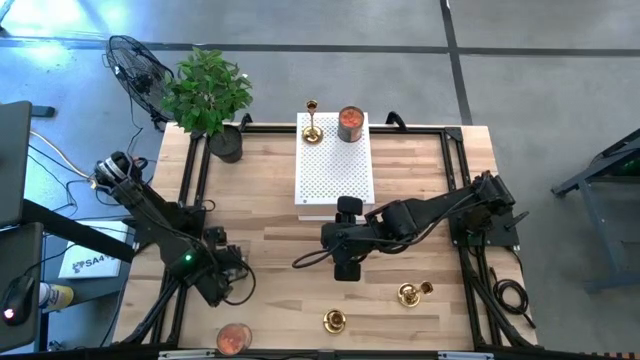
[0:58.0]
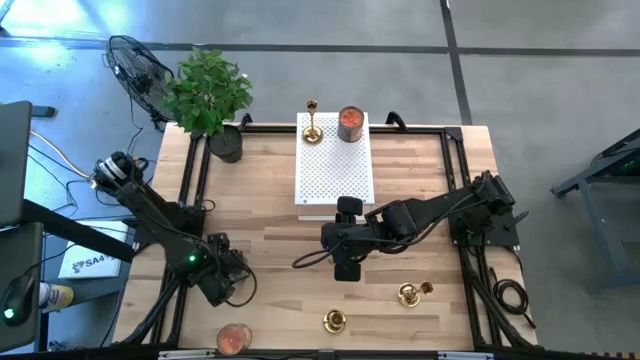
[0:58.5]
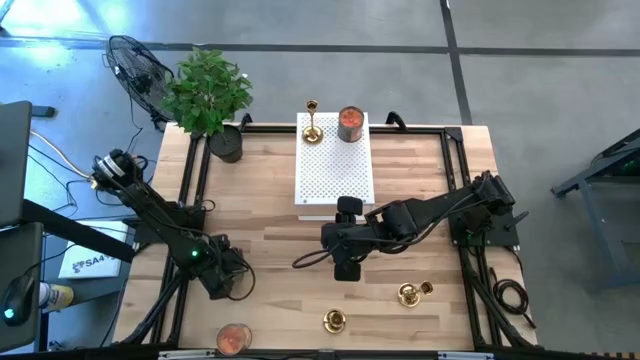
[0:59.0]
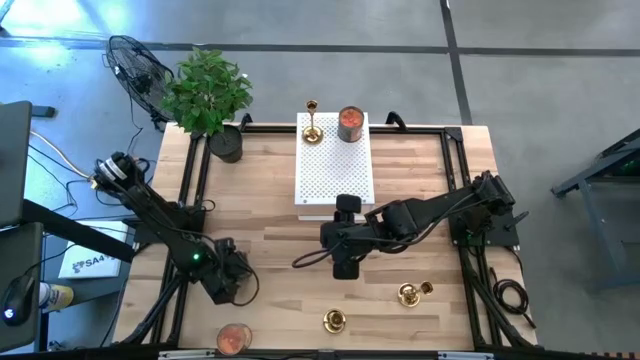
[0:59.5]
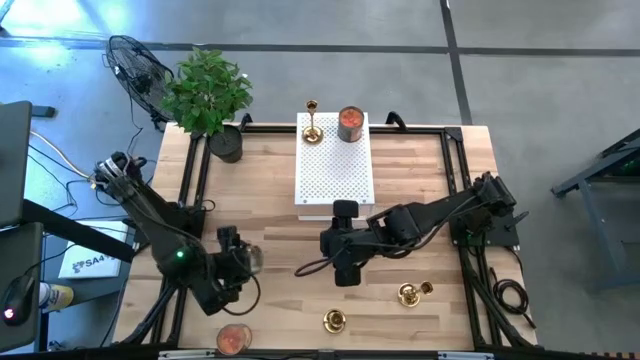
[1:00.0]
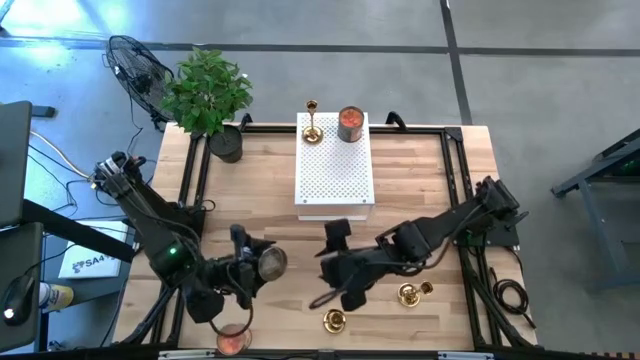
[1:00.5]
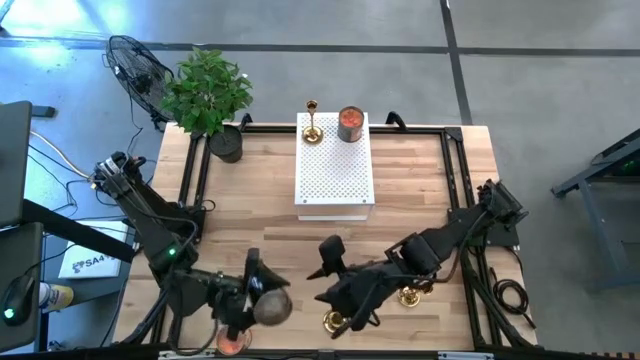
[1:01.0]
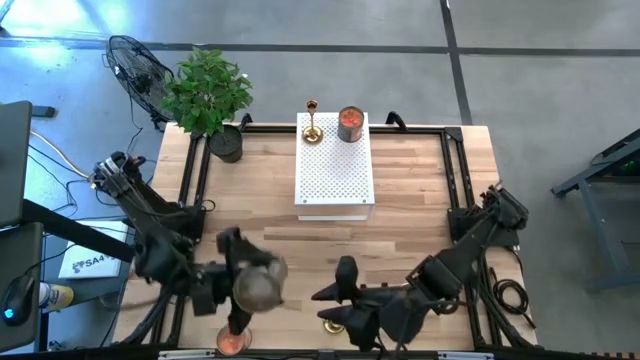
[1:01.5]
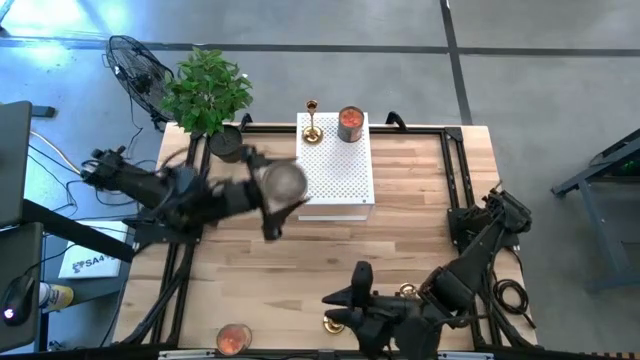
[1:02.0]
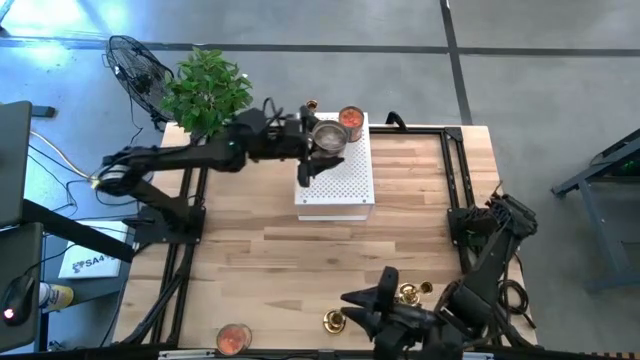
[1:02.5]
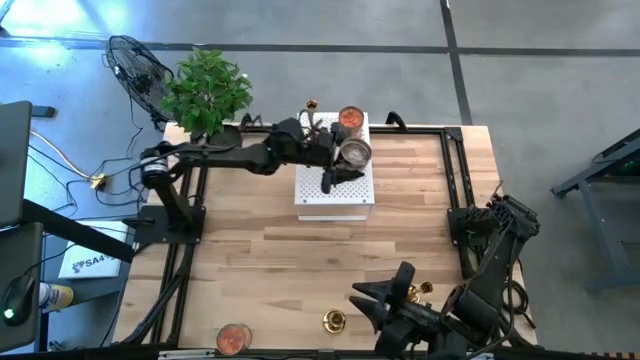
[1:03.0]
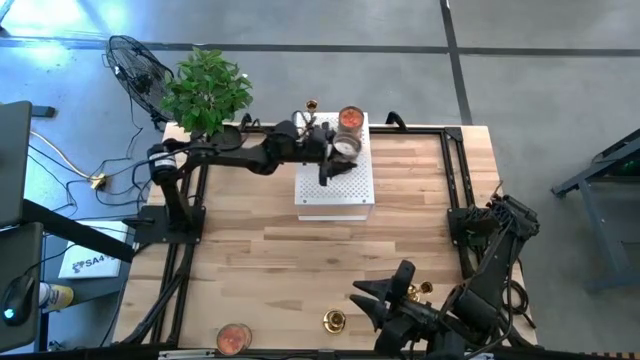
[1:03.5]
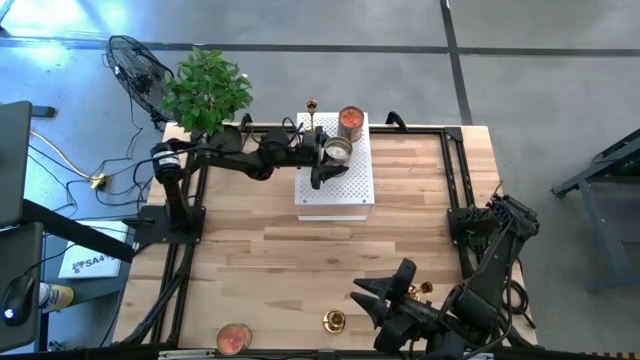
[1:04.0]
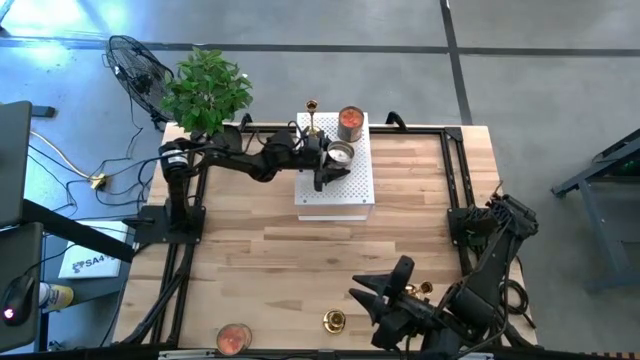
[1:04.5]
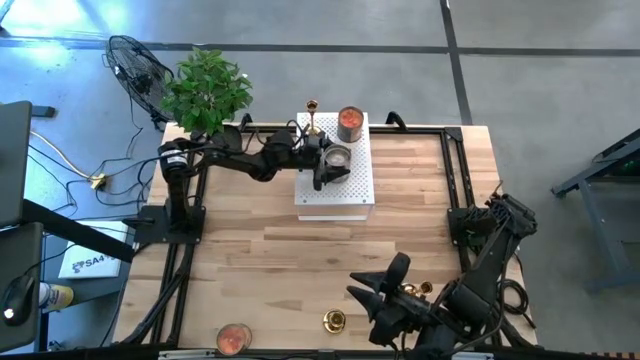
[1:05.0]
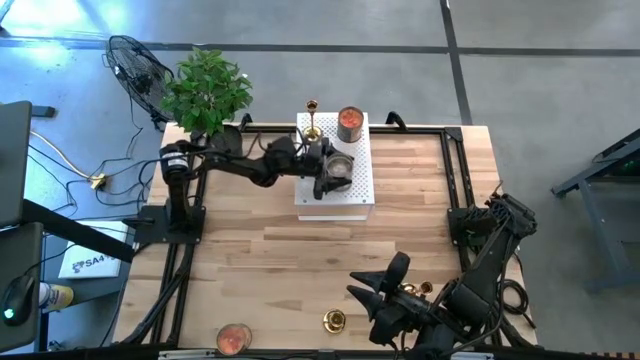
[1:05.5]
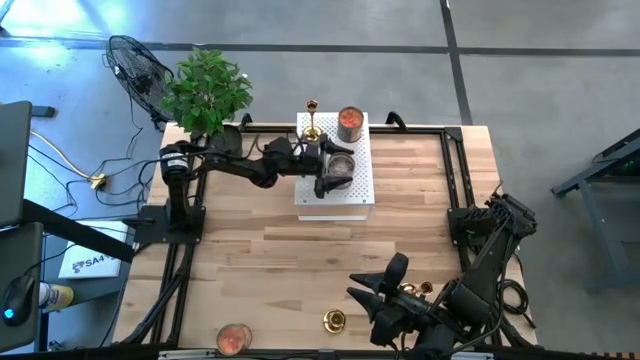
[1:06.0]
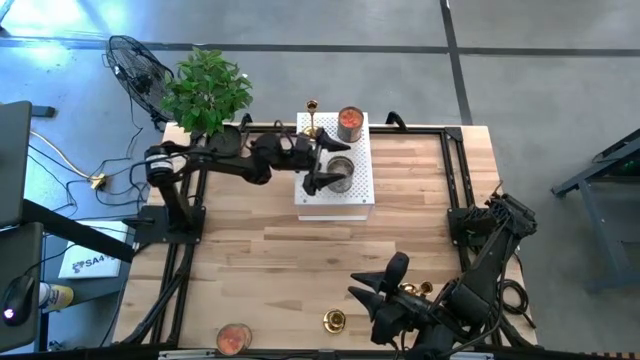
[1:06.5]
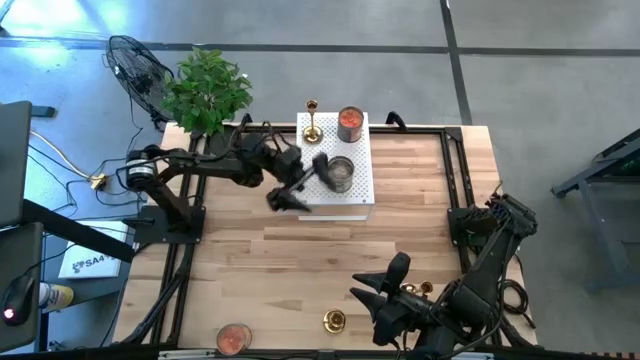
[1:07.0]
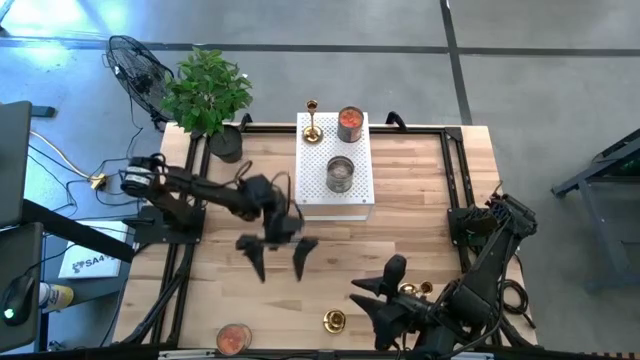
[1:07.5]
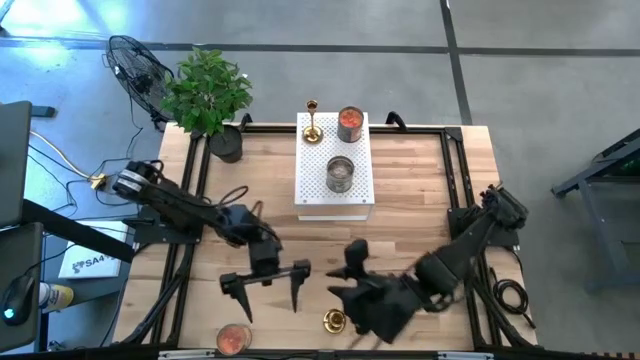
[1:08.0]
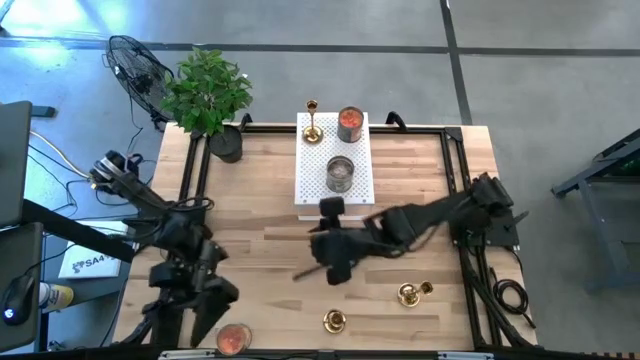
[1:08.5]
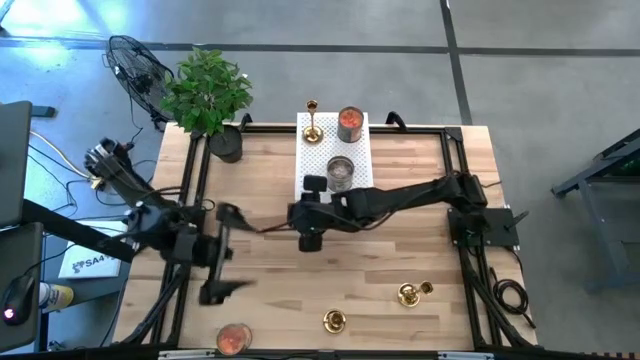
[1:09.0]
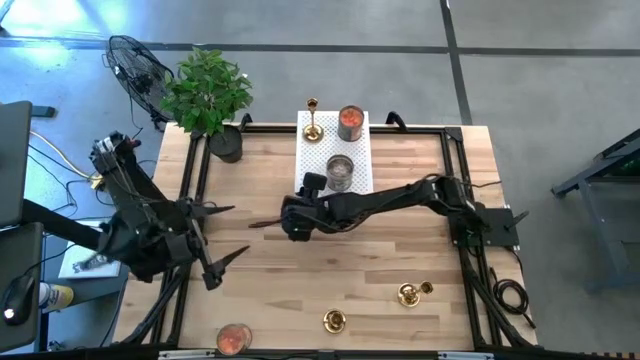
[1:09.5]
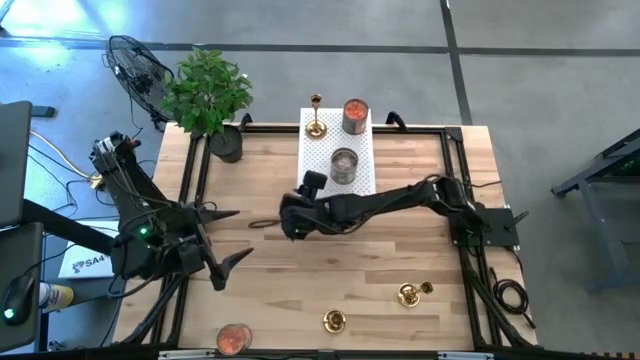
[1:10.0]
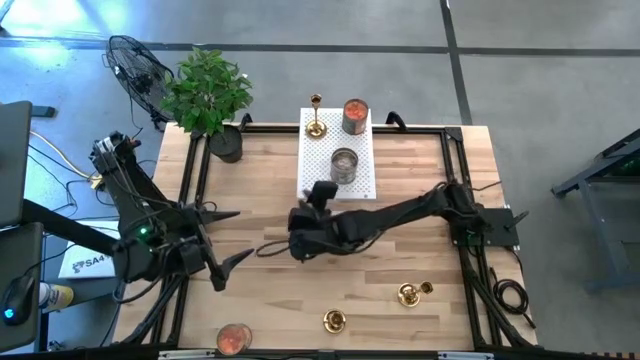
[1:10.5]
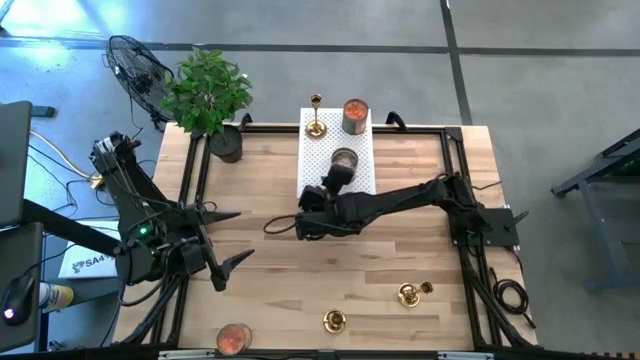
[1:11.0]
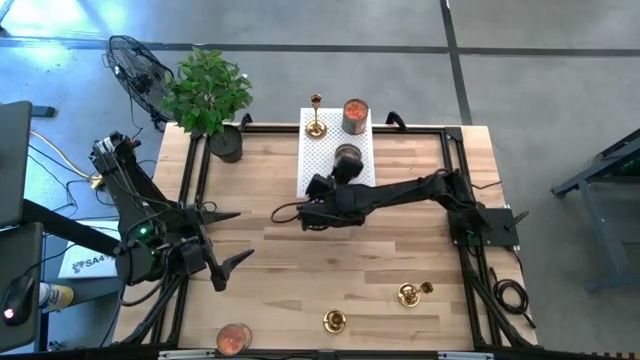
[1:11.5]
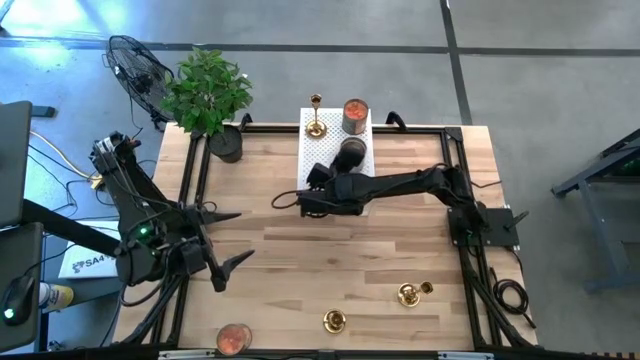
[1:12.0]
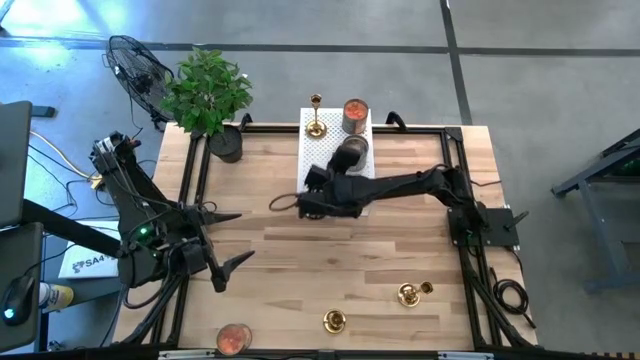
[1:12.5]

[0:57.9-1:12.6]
Task: Pick & Place candle stick holders
Put the brown scented candle on the shelf

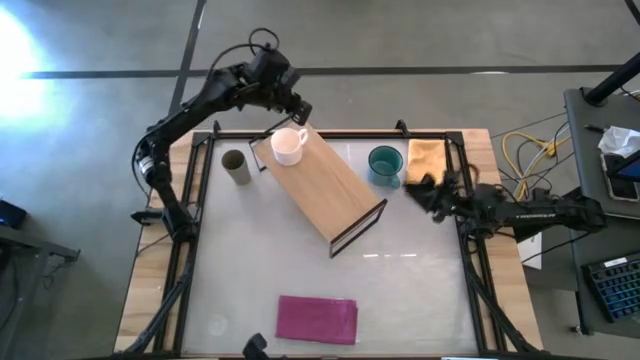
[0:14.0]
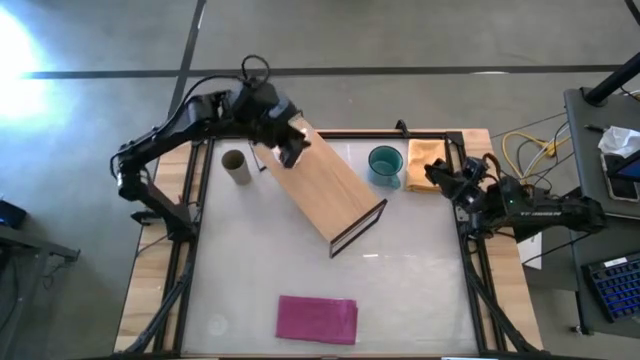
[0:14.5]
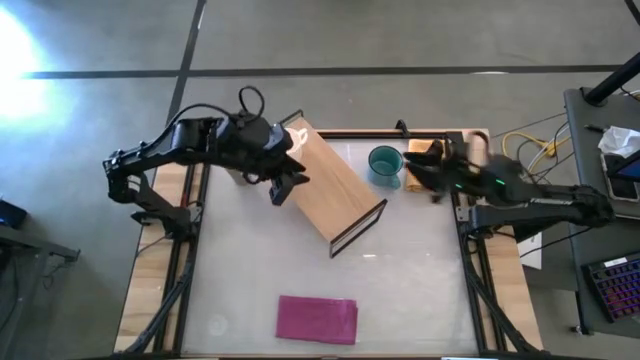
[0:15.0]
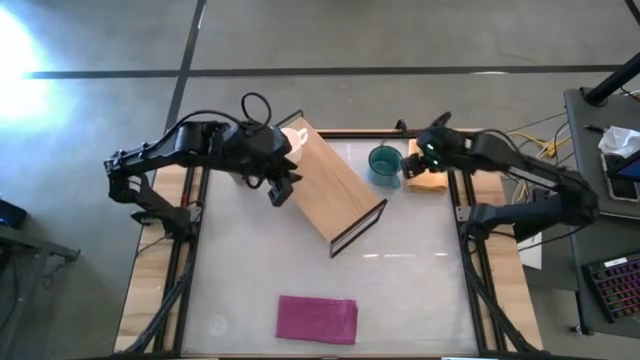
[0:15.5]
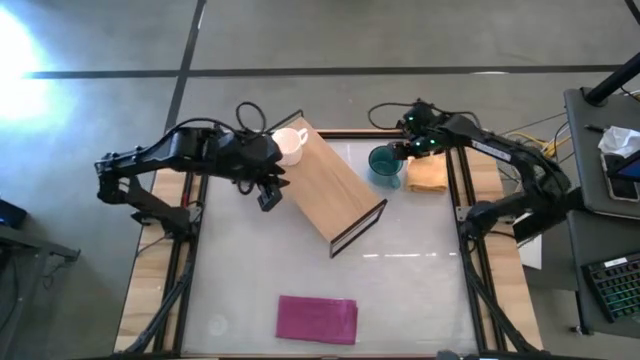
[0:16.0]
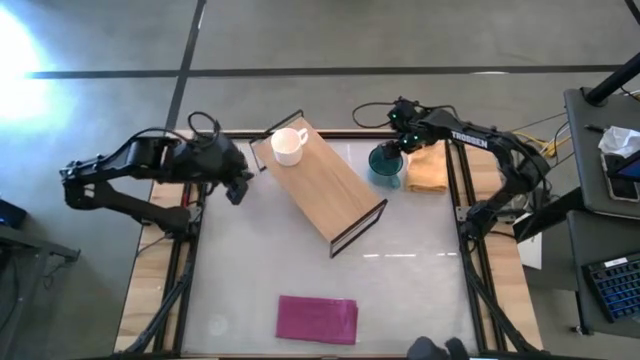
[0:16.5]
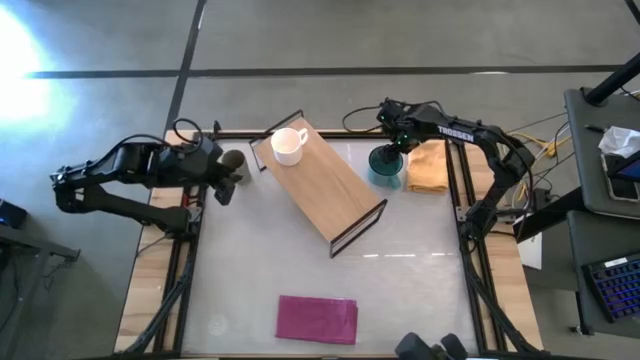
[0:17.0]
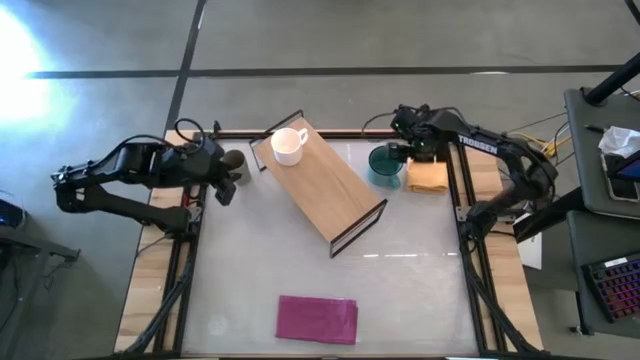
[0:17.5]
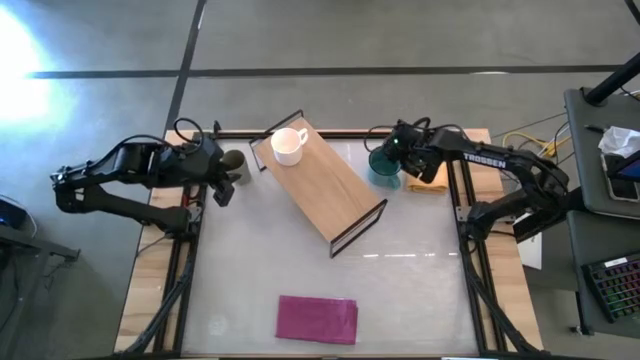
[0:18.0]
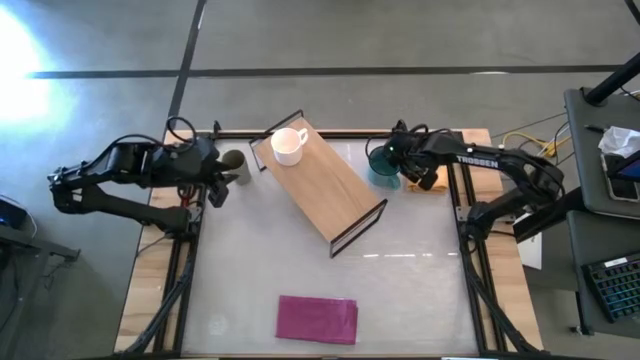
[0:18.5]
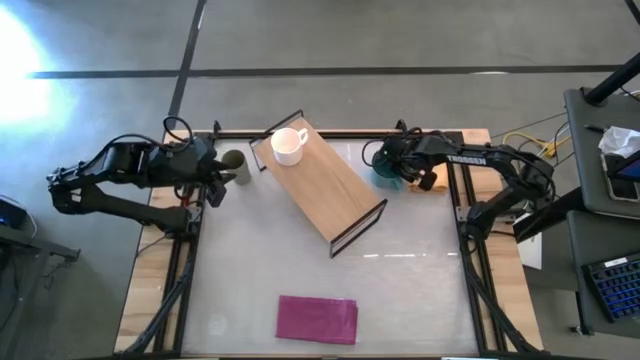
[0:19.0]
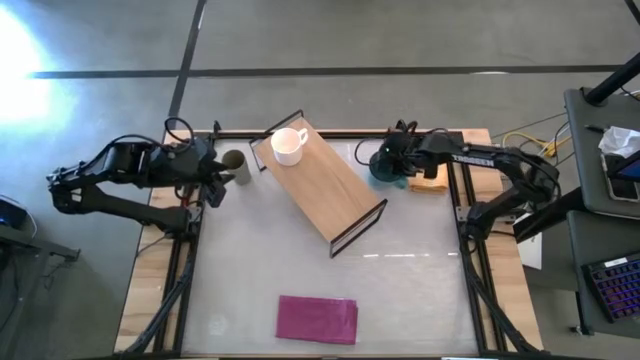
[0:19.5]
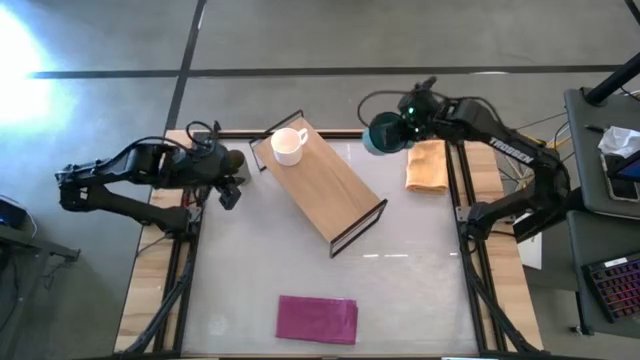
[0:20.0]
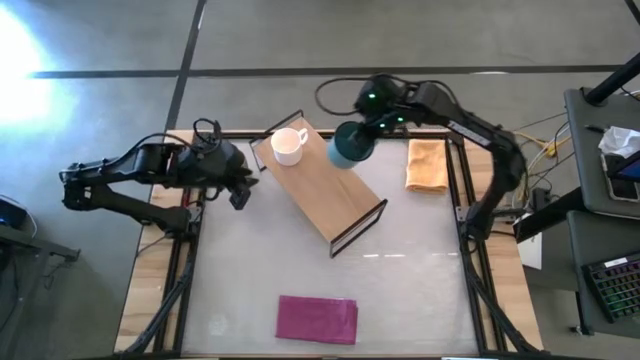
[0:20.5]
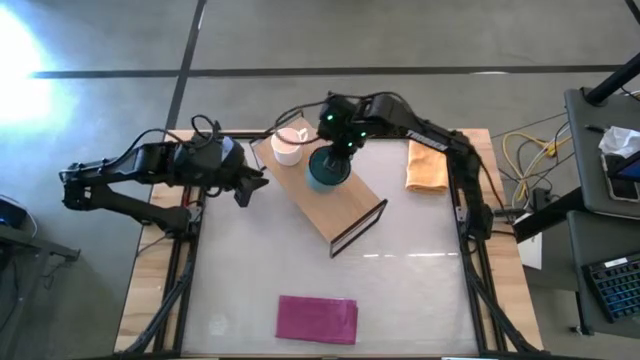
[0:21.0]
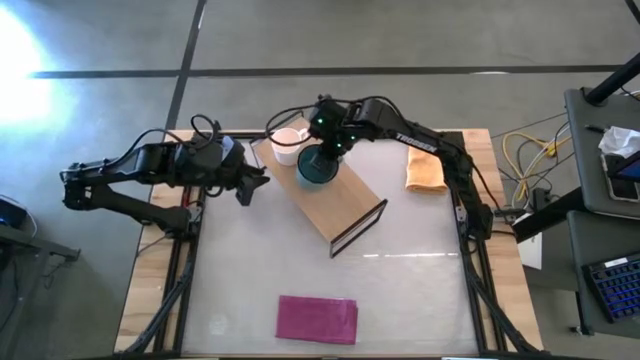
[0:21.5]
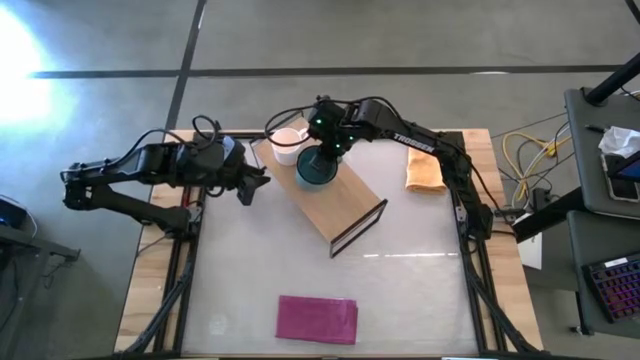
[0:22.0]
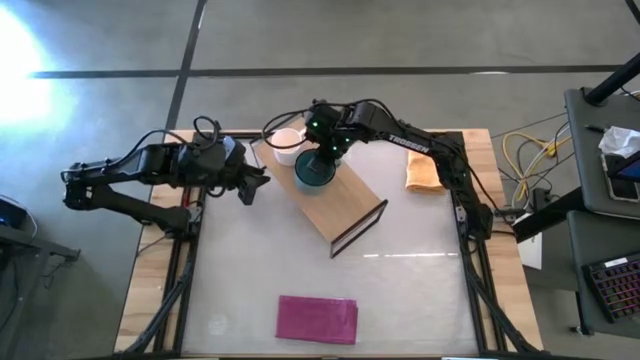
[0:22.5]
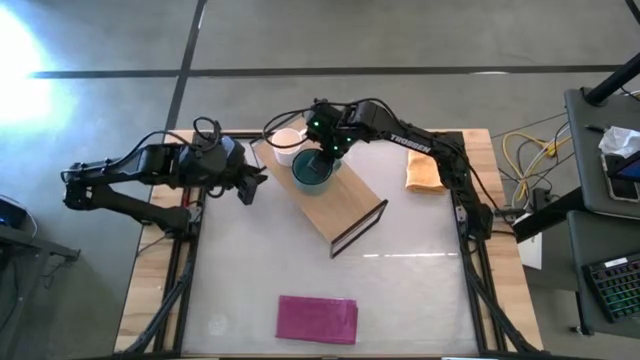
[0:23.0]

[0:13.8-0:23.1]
Task: Stack small to large cups/mugs on shelf
Put the pine green mug on the shelf
